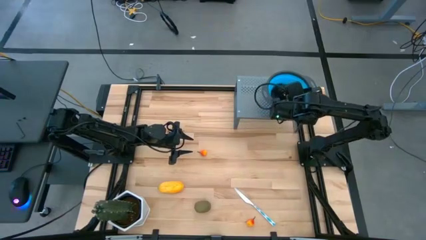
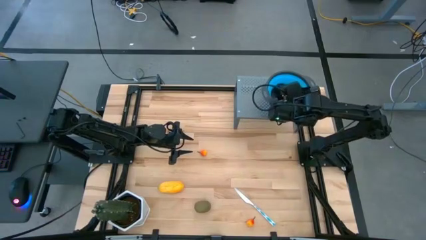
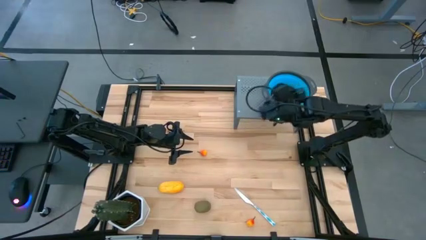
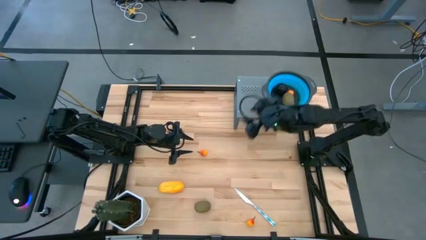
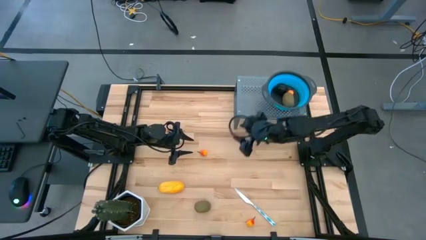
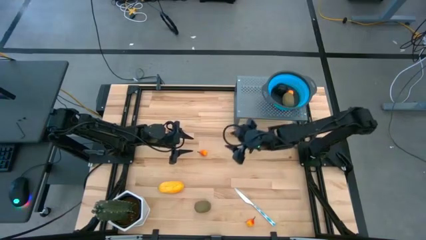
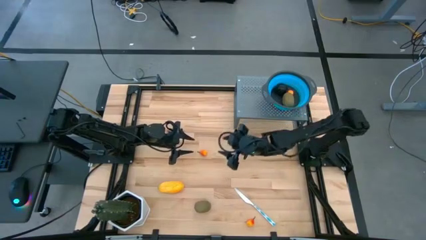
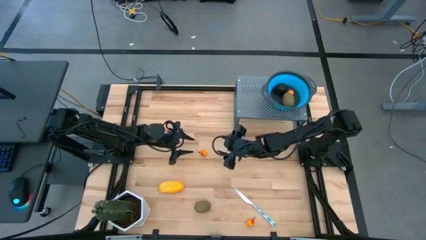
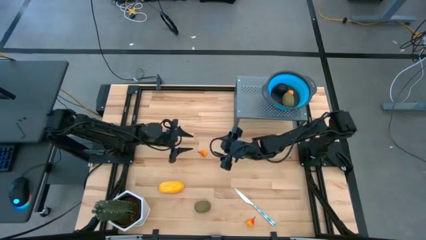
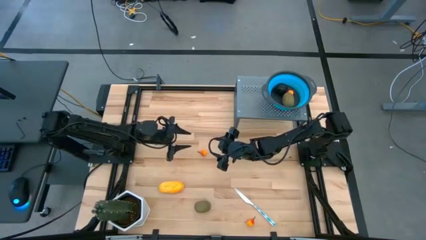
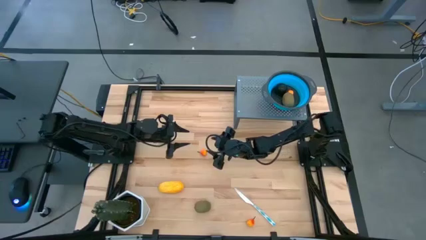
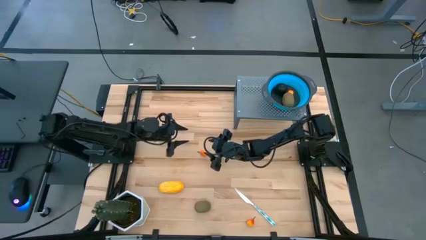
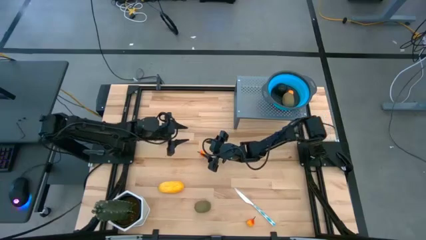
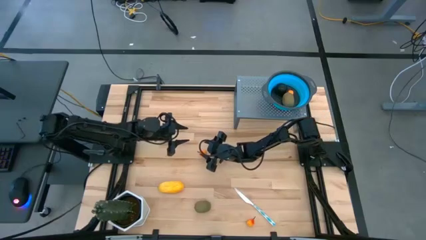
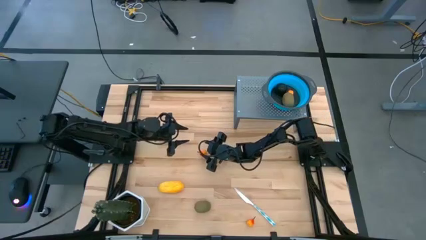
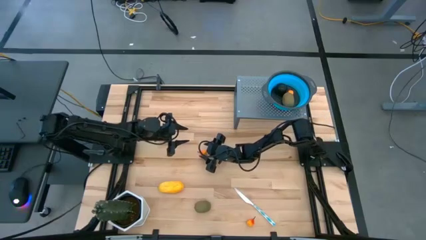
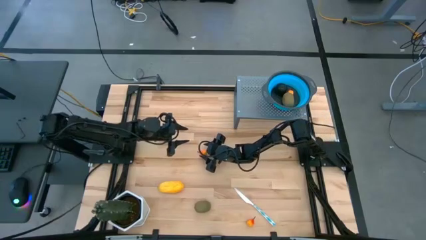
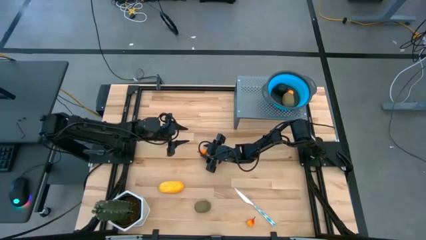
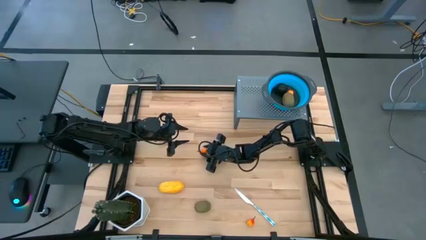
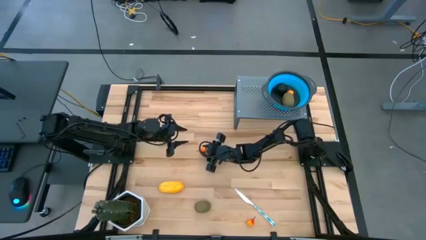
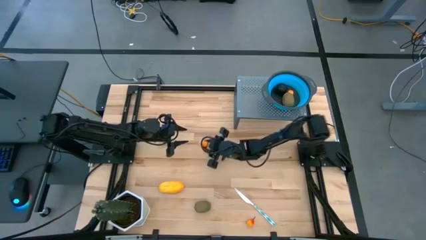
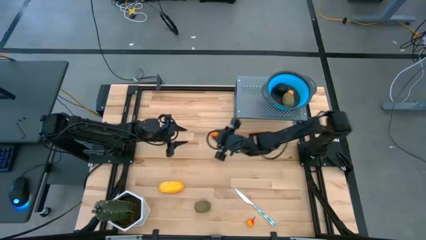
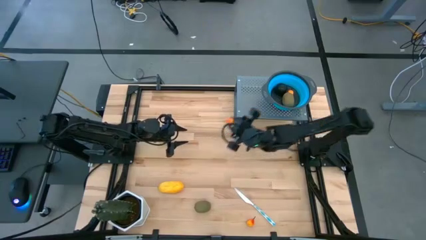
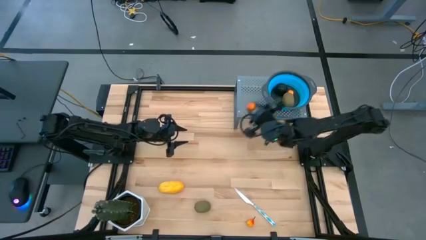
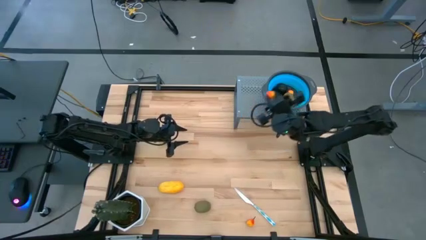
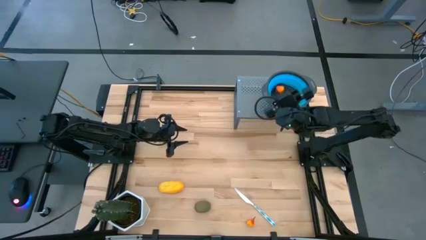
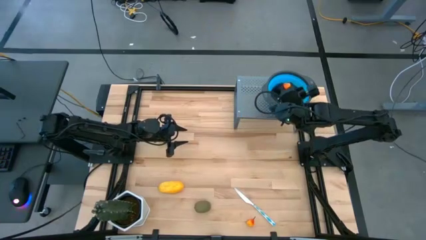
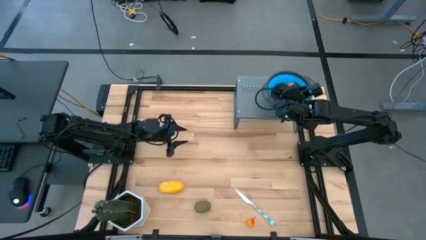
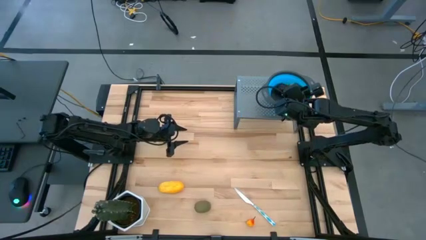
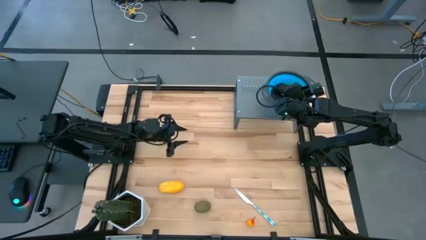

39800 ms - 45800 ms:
Task: Pick & Place Fruit
Put the yellow pear into the blue strainer bowl on the shelf

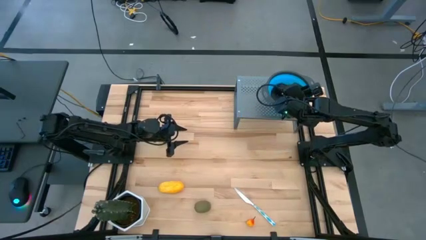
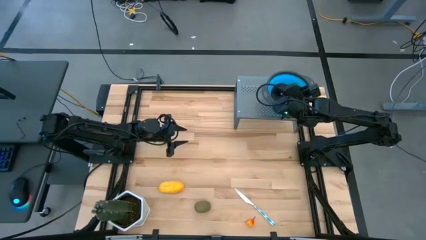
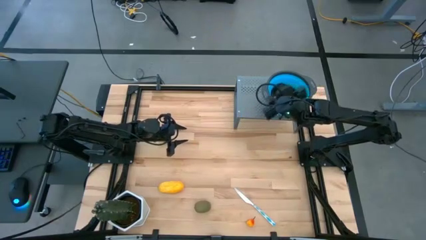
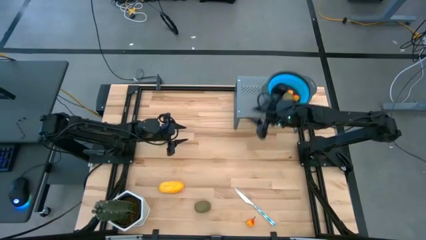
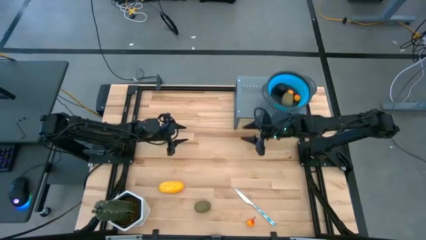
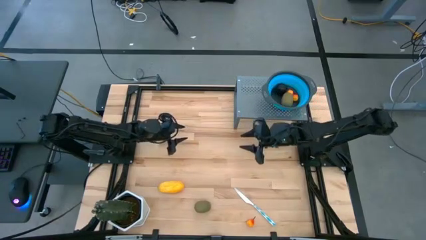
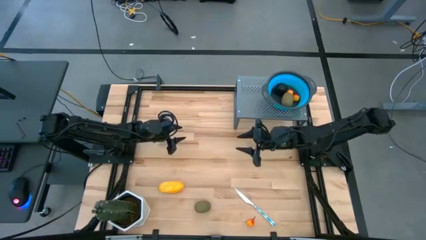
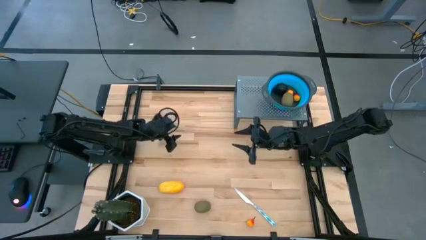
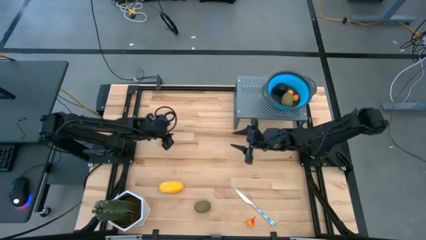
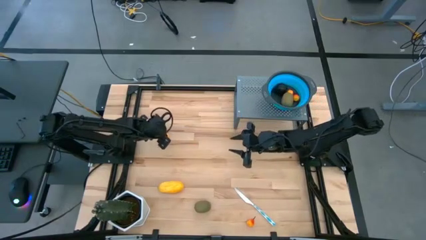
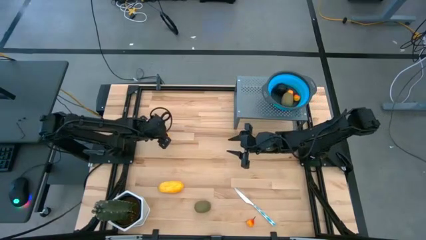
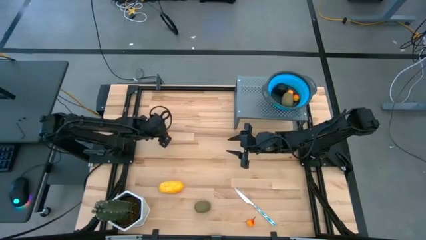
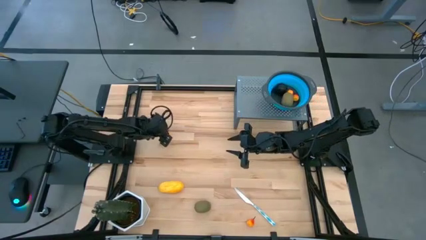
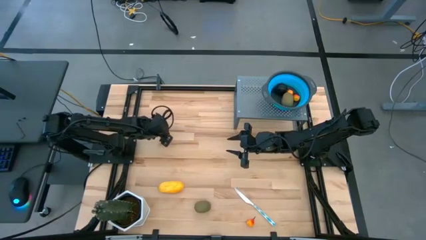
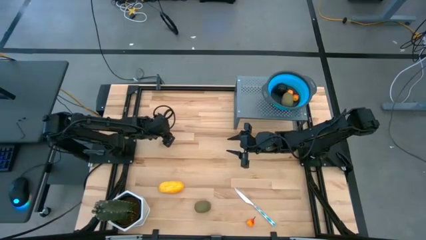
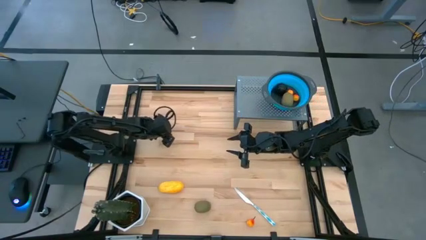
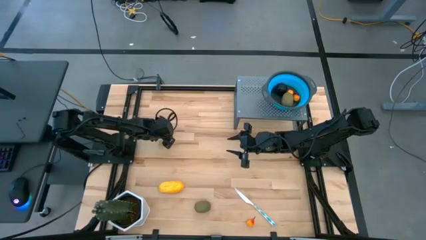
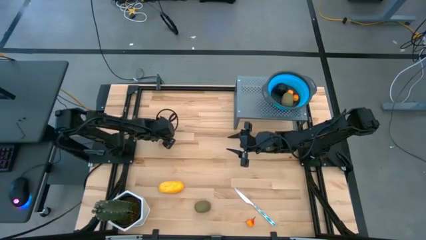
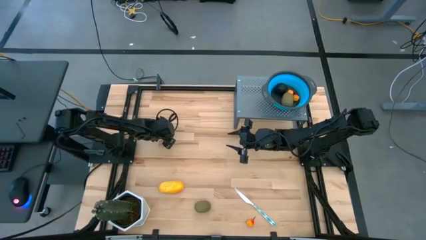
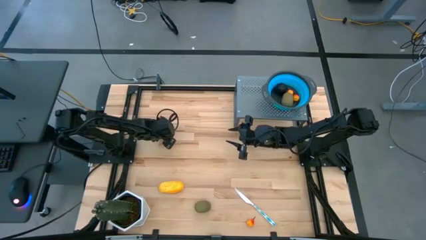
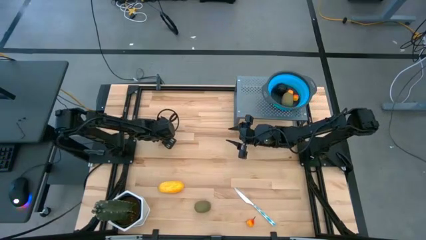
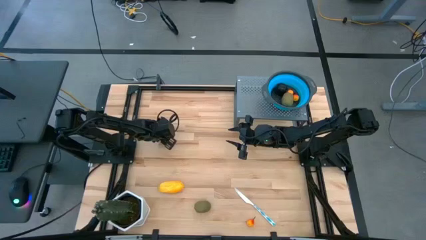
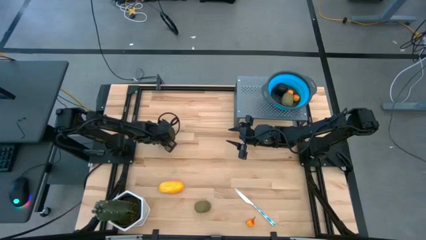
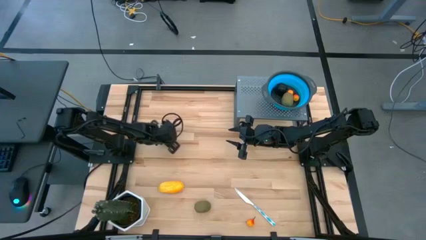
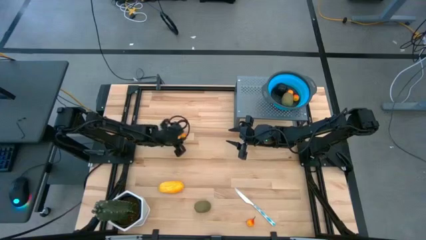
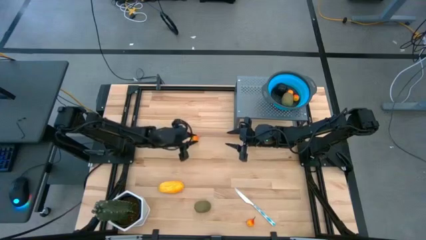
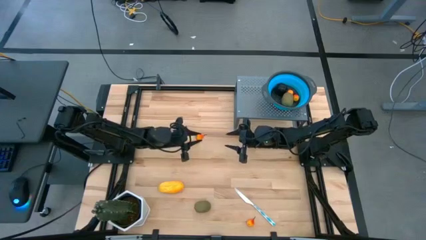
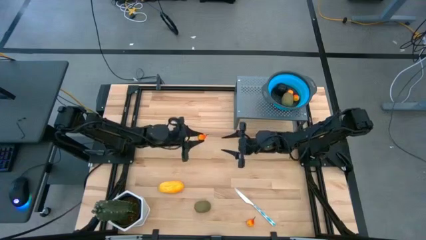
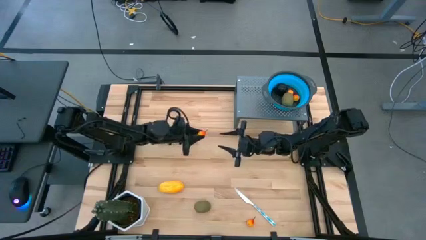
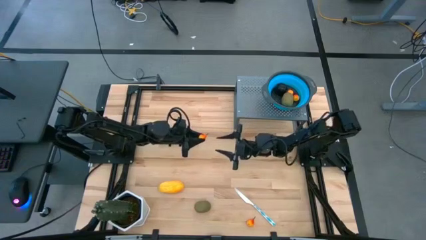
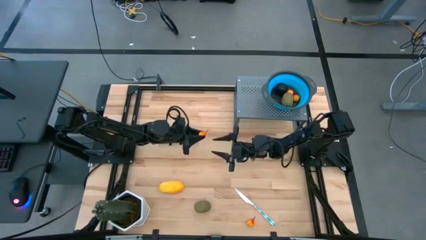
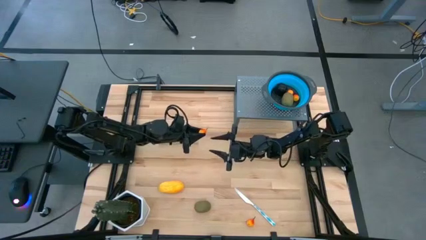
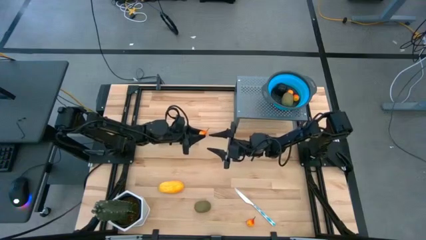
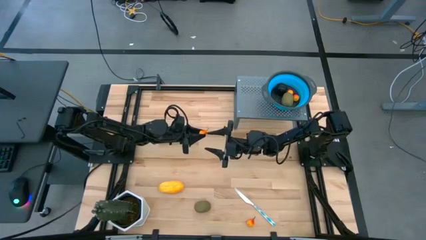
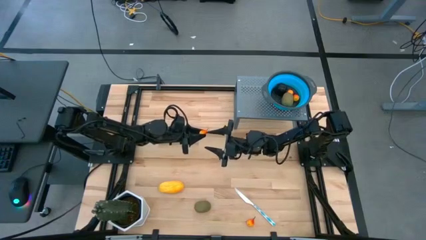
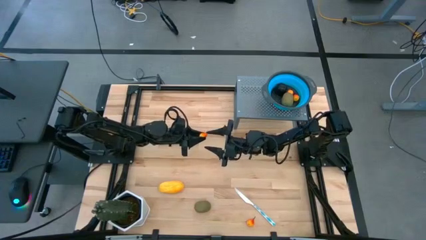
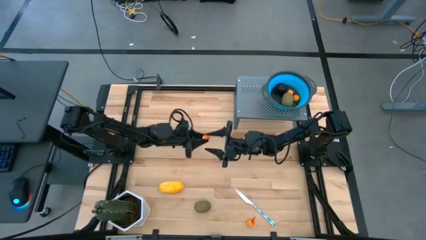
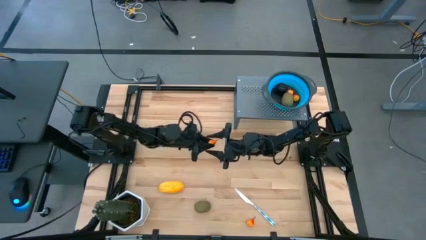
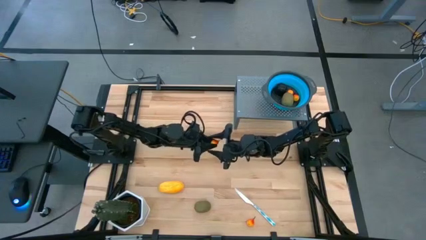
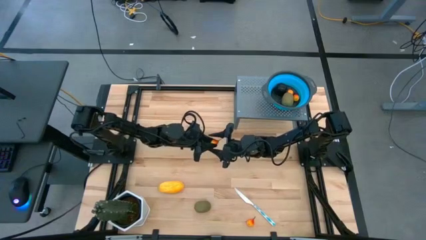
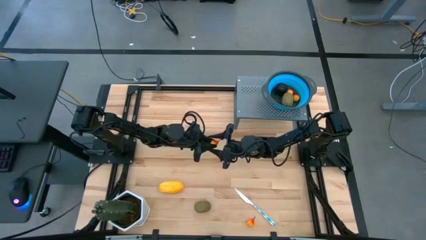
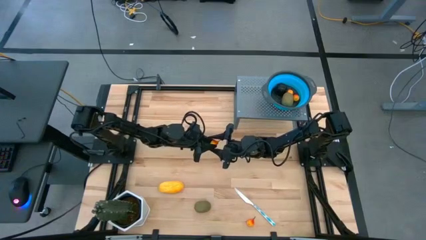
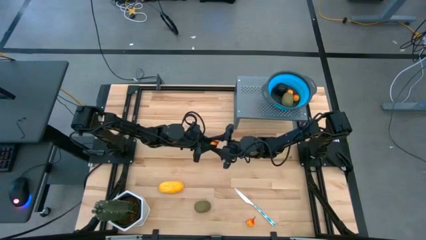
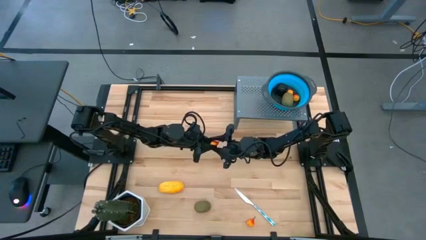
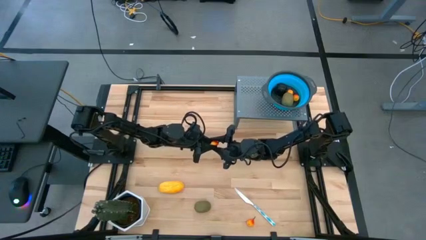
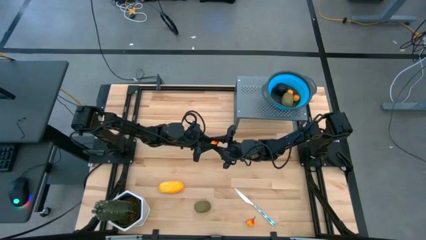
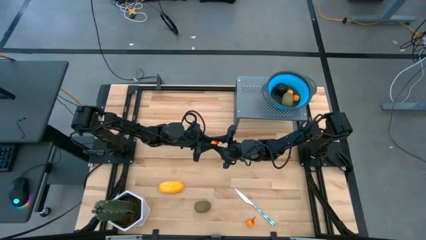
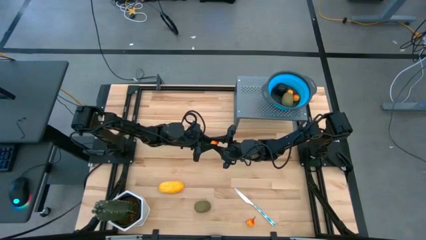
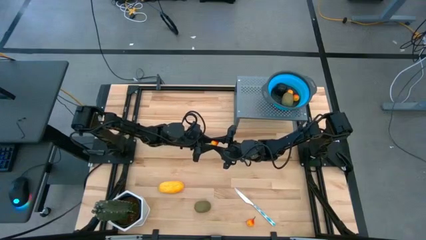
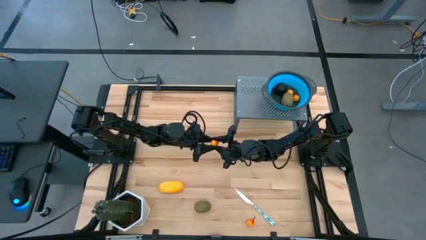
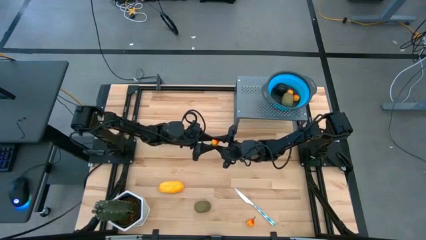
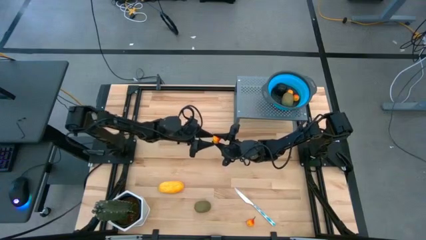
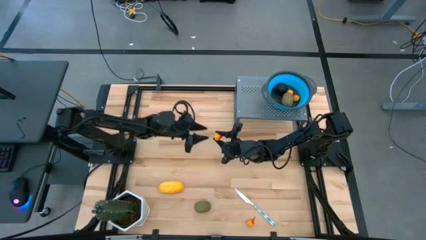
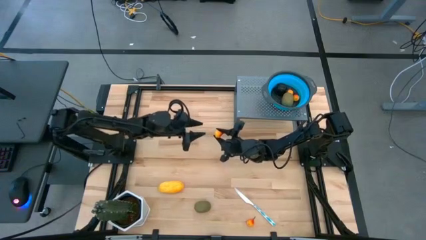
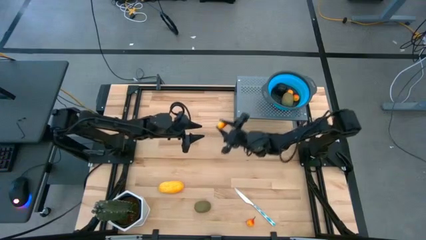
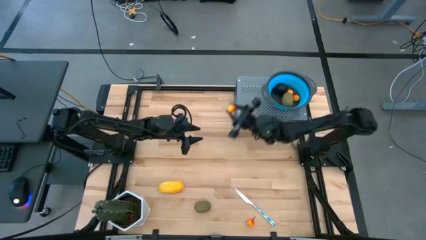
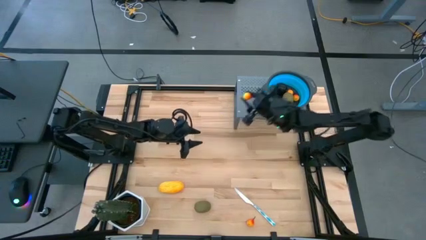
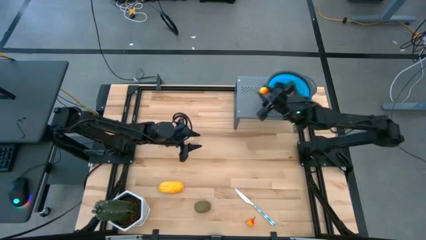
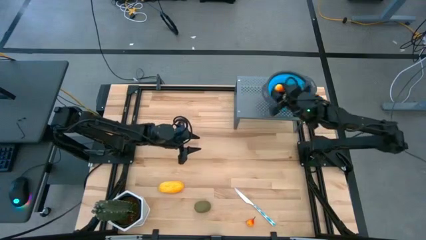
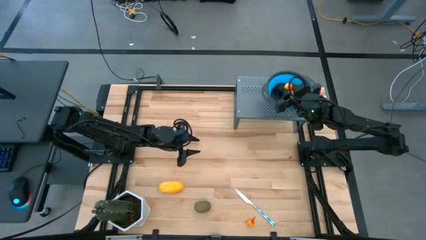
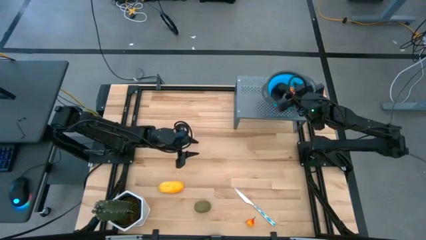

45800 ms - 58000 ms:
Put the yellow peach into the blue strainer bowl on the shelf
